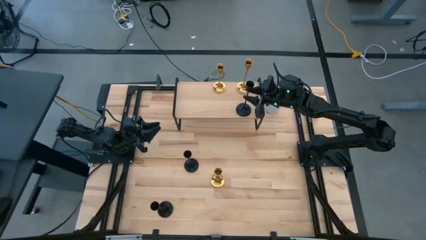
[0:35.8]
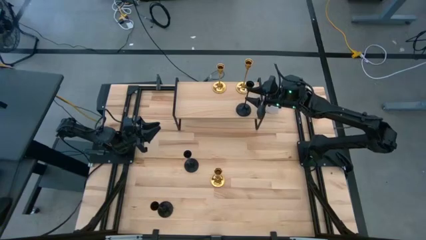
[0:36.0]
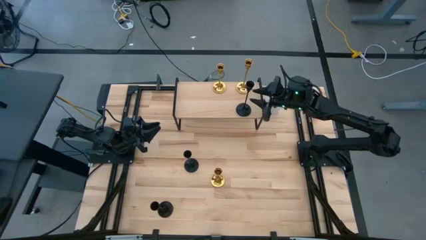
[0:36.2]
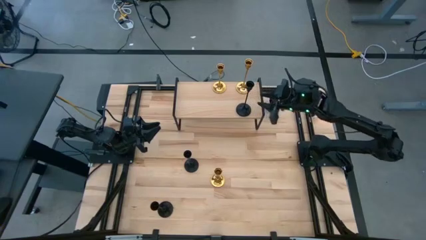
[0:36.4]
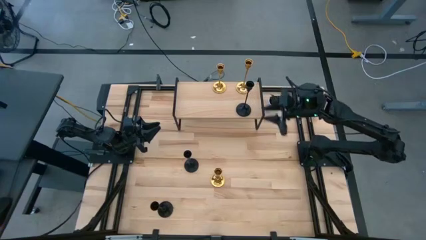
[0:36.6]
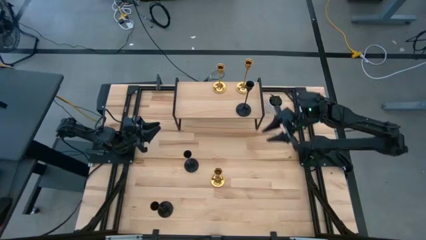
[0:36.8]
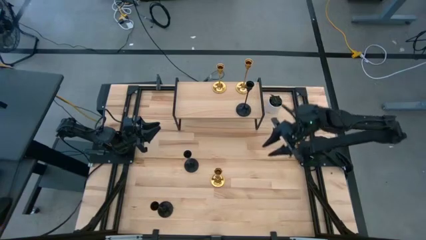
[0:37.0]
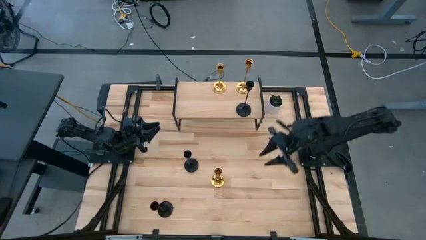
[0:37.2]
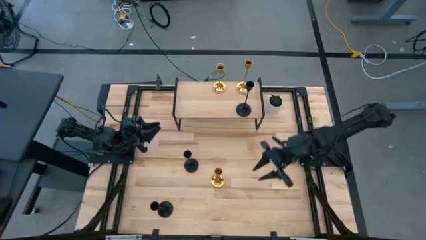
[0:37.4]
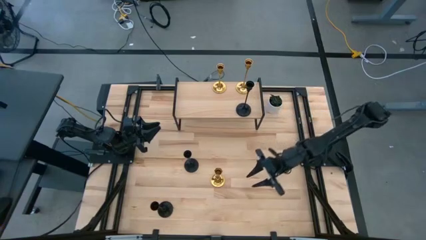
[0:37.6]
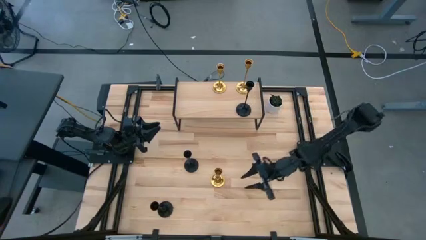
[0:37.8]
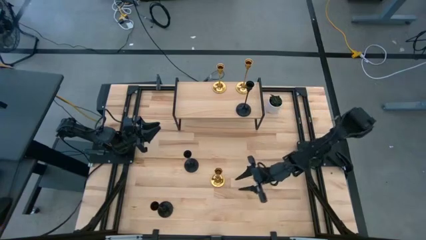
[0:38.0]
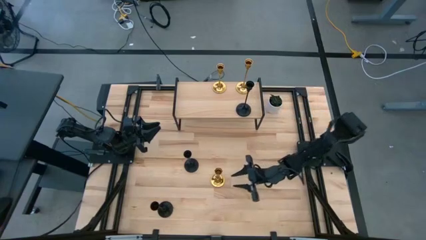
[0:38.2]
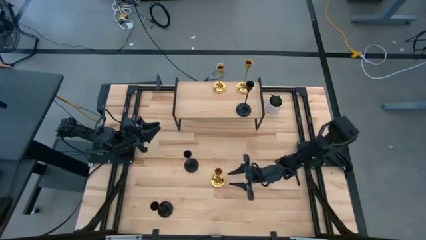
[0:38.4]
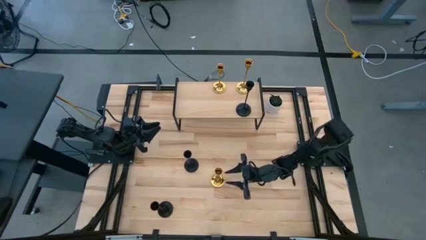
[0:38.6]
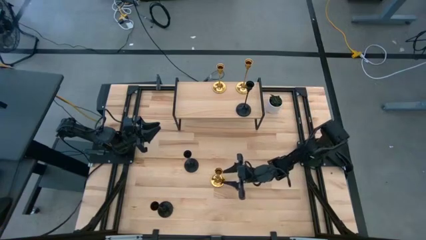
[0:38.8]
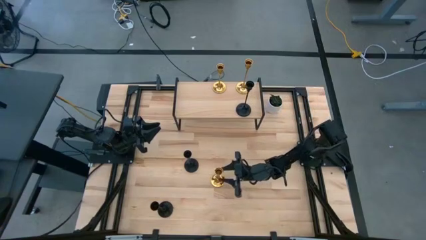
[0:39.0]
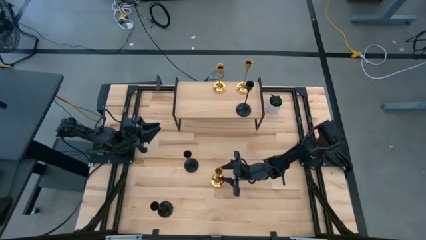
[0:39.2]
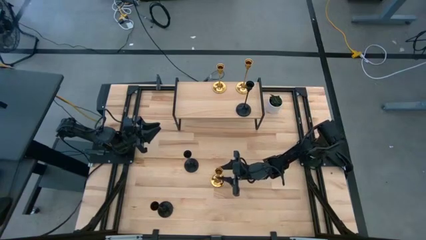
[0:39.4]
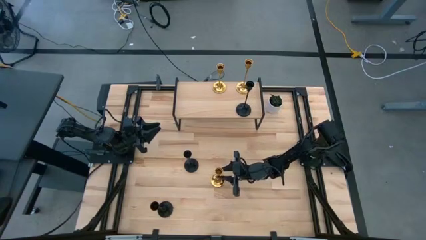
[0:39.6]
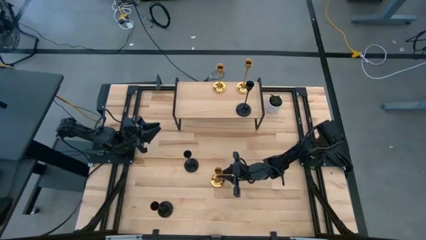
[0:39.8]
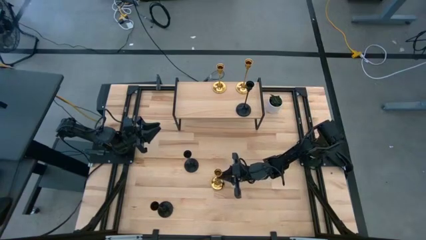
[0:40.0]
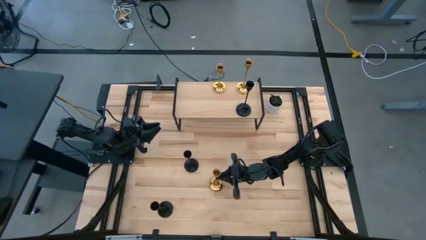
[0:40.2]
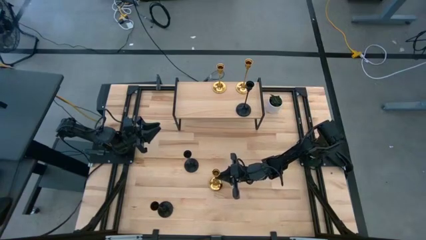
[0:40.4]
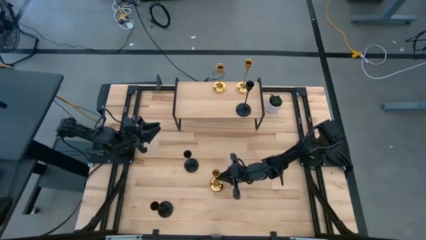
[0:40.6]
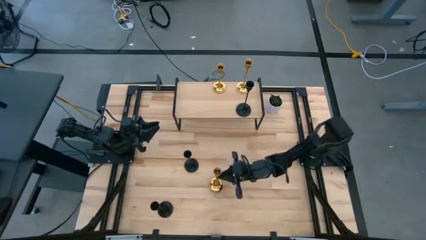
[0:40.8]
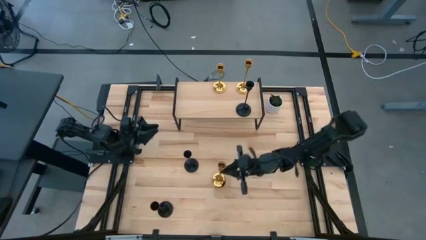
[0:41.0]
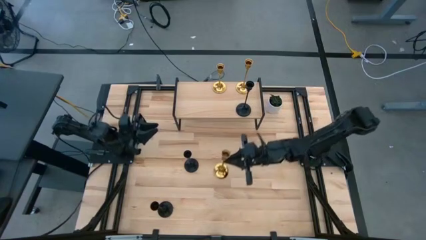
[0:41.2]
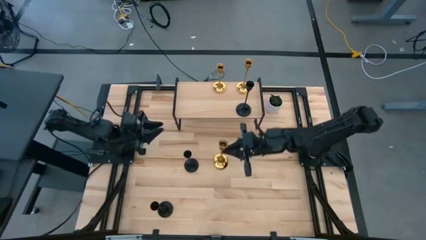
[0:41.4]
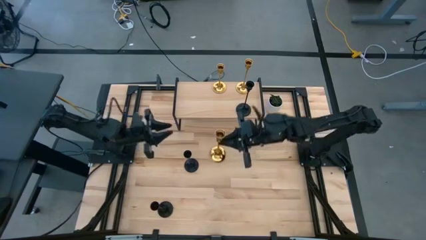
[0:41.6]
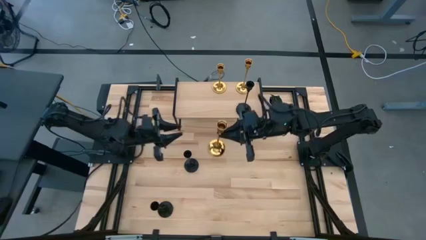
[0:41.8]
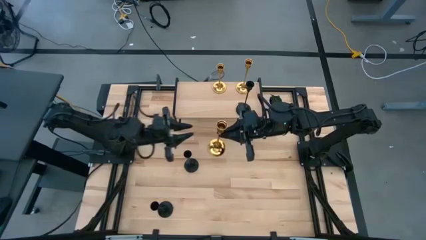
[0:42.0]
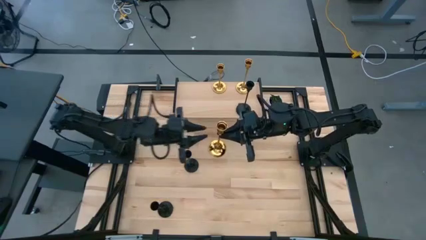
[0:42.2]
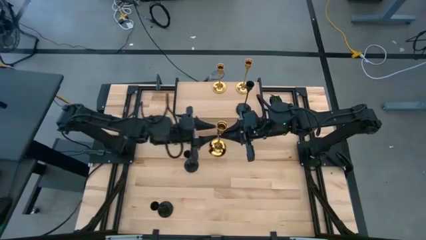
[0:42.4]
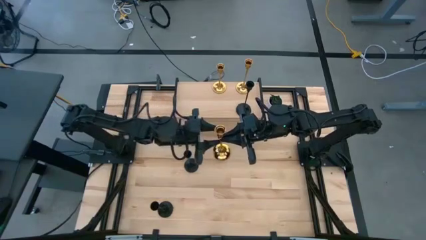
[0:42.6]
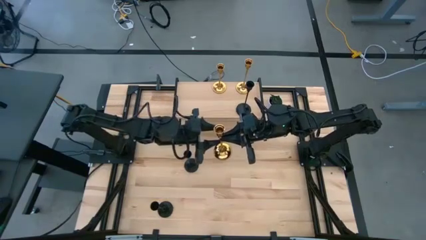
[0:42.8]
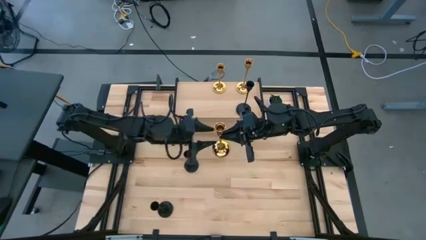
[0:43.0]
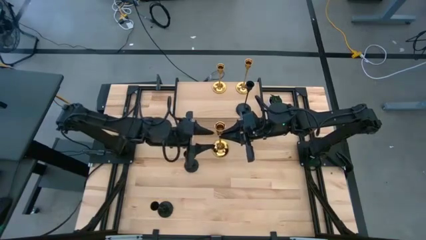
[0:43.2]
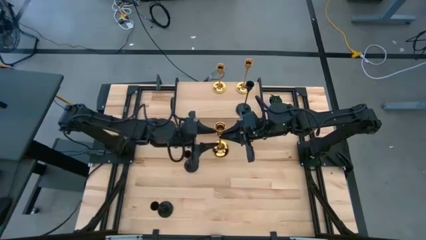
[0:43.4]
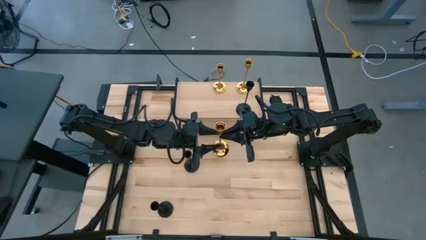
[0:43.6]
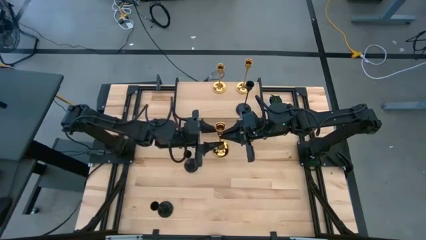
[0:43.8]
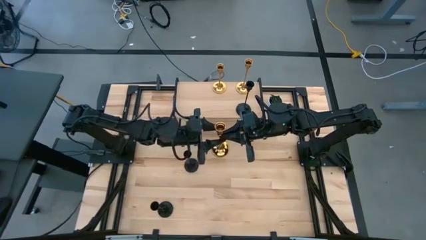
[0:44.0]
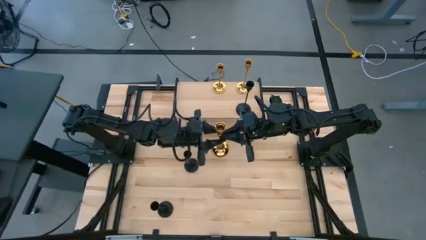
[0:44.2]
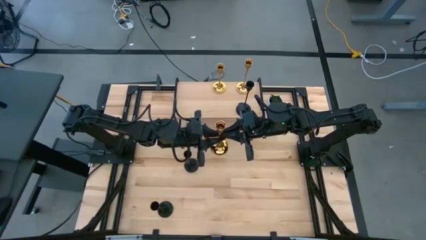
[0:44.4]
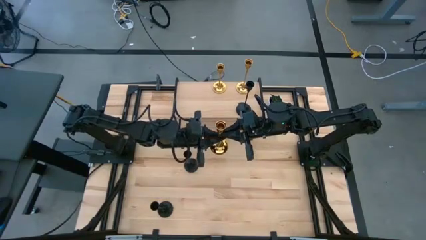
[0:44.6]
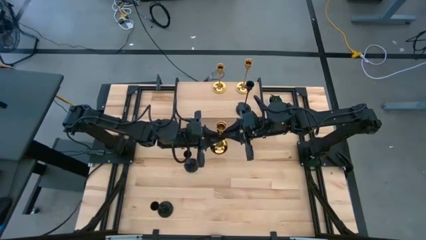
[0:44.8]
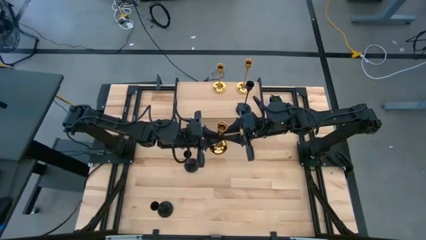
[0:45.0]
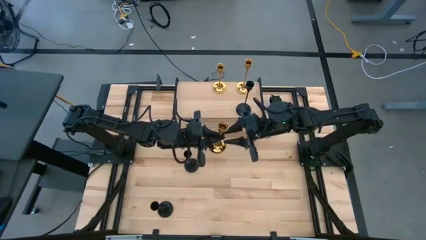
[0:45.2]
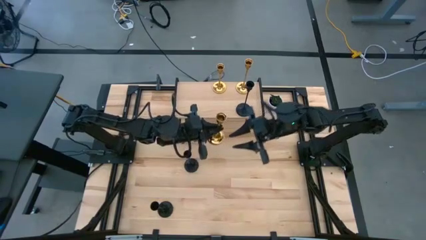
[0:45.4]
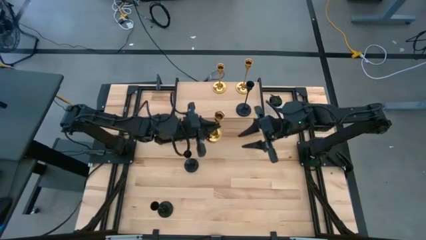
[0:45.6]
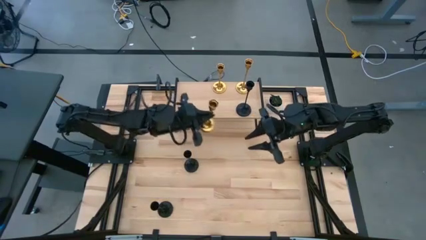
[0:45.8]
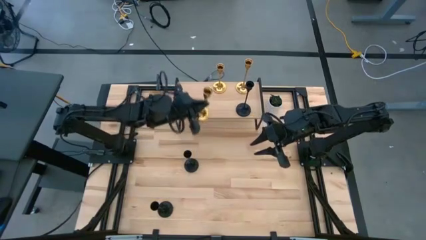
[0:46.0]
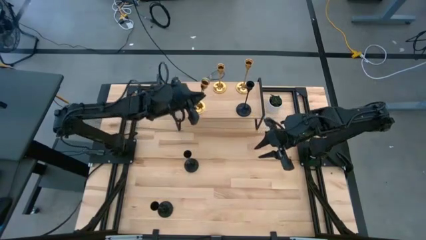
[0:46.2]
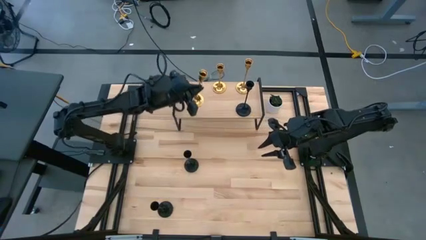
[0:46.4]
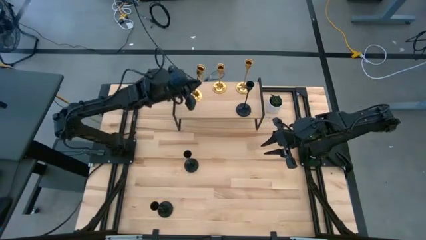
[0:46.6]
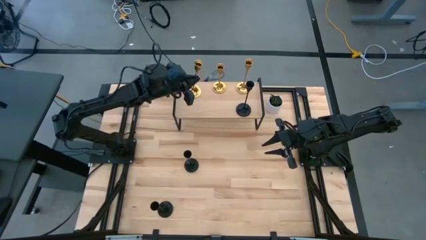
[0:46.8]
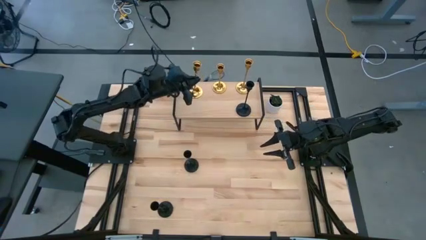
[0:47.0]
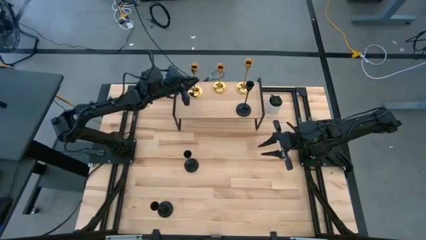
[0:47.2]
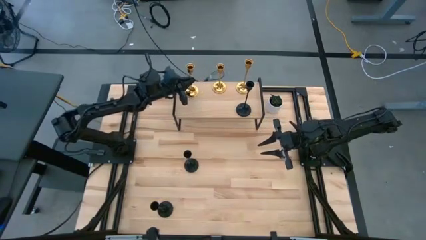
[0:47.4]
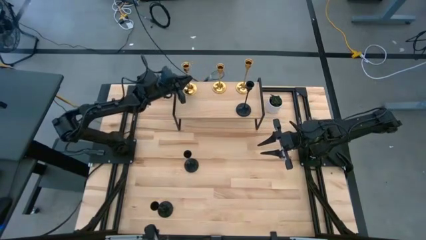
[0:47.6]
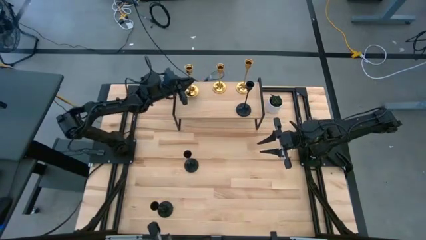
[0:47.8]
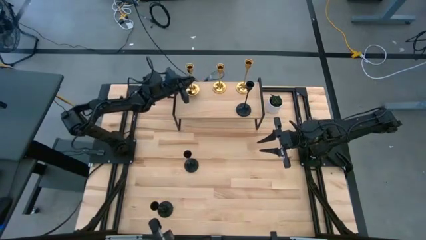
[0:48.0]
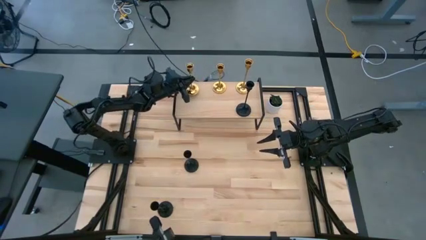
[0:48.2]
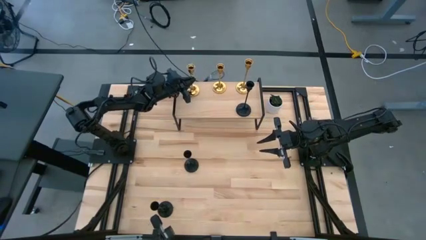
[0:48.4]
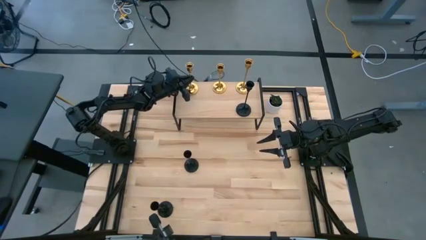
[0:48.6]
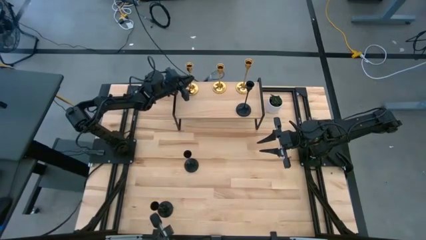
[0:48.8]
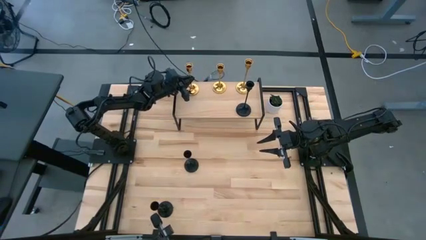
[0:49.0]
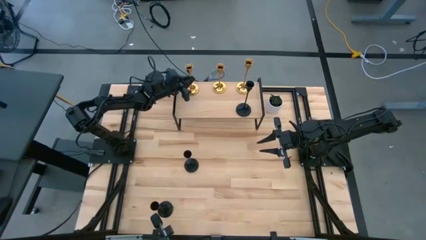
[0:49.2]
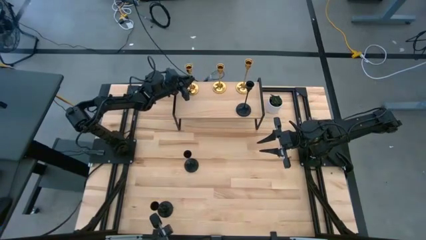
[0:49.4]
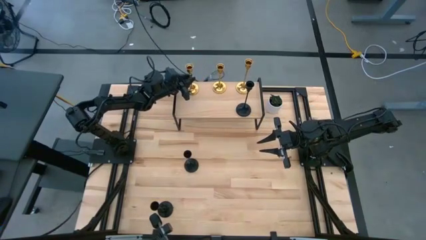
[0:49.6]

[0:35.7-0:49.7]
Task: Pick & Place candle stick holders
Put the gold candle holder on the shelf
